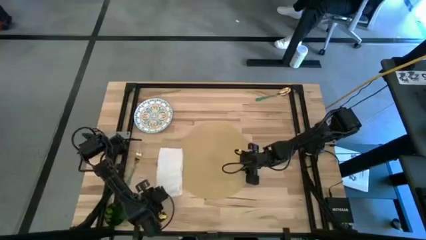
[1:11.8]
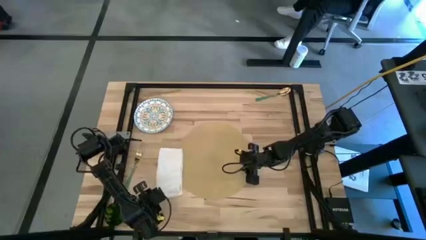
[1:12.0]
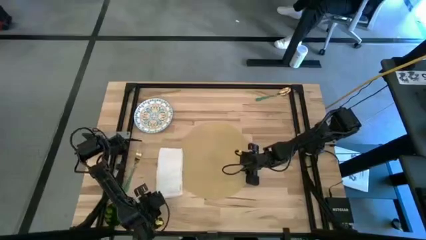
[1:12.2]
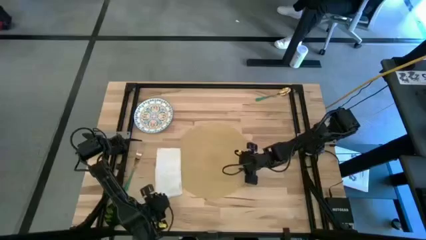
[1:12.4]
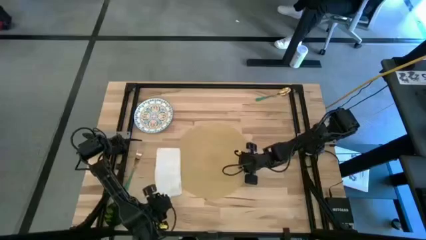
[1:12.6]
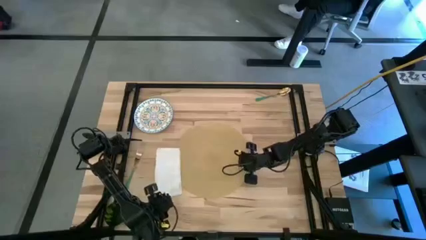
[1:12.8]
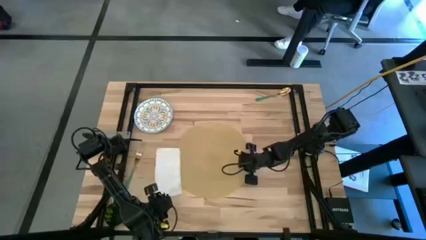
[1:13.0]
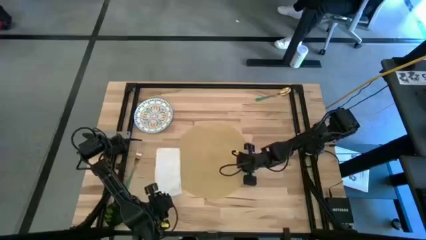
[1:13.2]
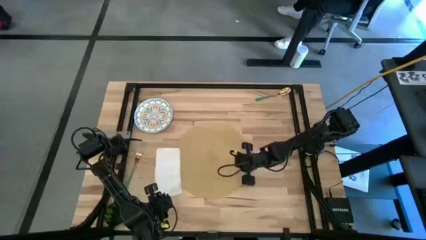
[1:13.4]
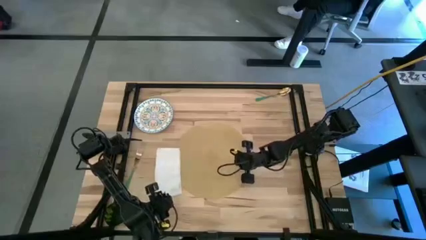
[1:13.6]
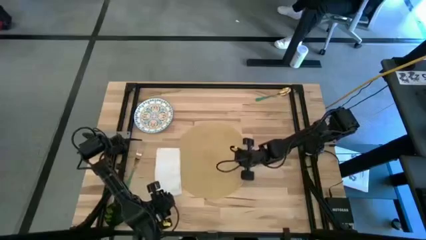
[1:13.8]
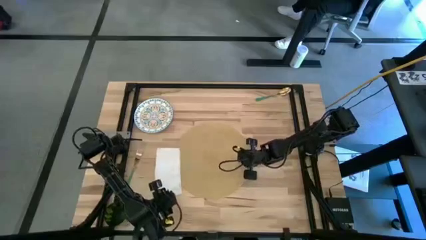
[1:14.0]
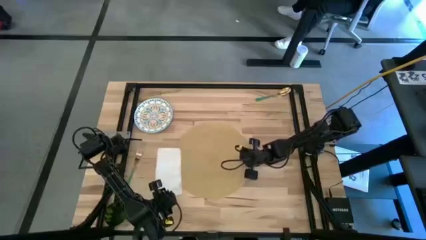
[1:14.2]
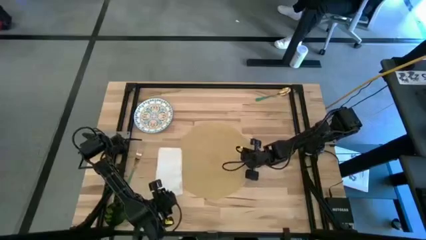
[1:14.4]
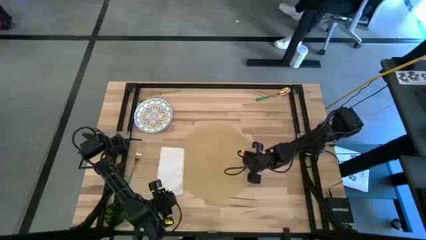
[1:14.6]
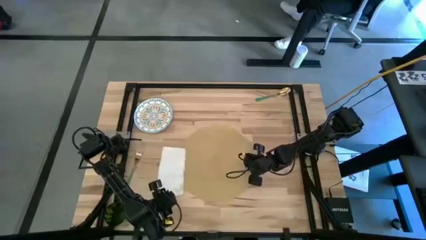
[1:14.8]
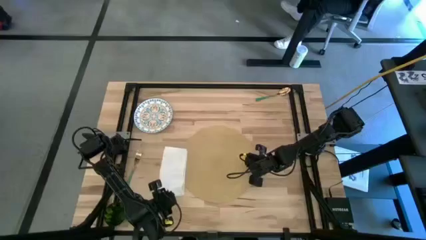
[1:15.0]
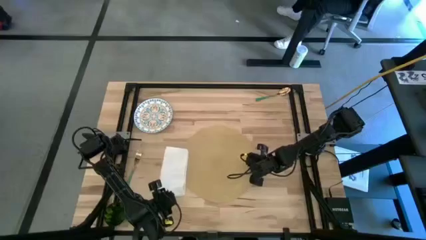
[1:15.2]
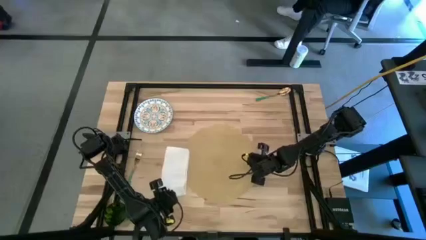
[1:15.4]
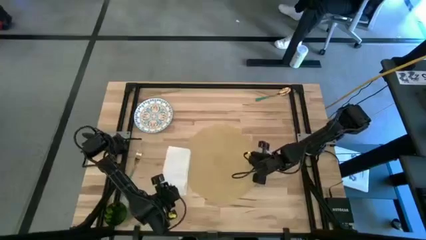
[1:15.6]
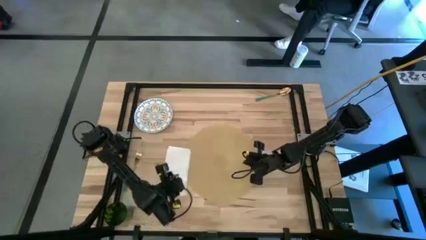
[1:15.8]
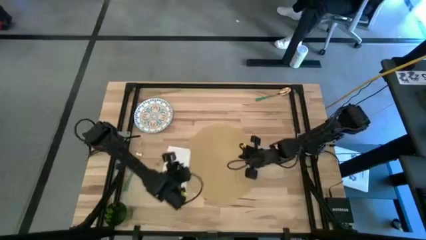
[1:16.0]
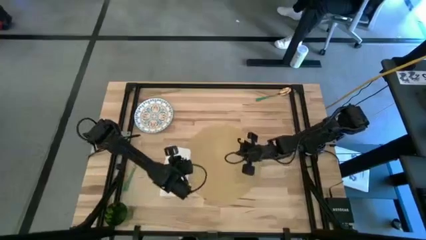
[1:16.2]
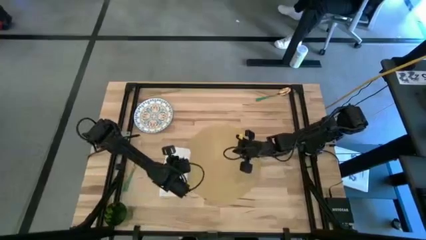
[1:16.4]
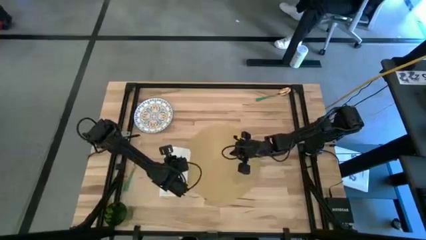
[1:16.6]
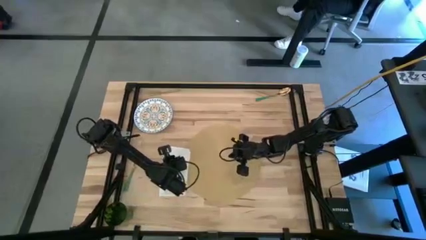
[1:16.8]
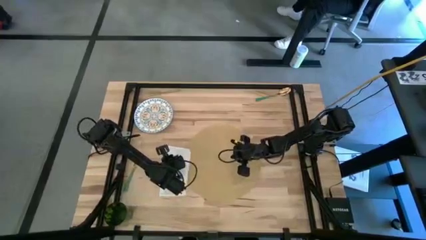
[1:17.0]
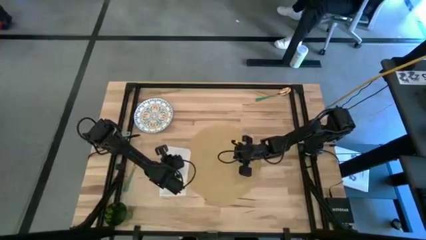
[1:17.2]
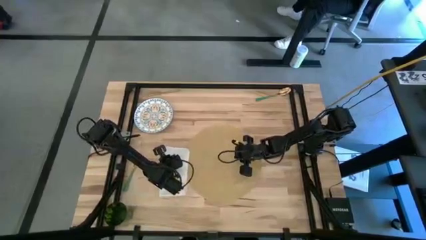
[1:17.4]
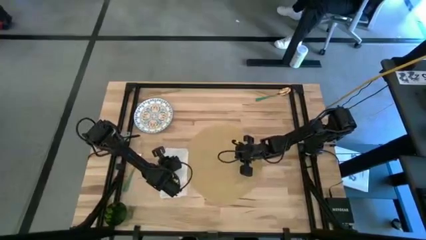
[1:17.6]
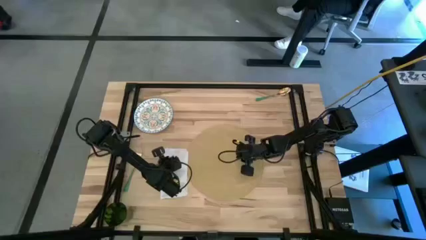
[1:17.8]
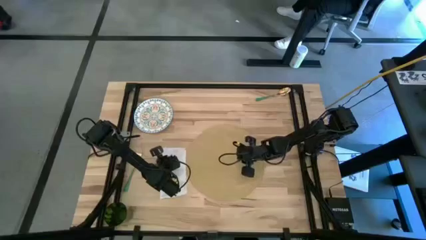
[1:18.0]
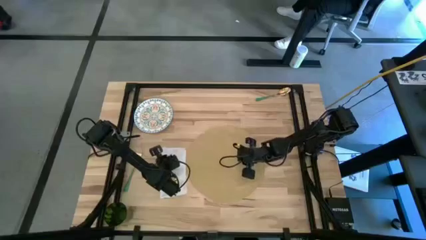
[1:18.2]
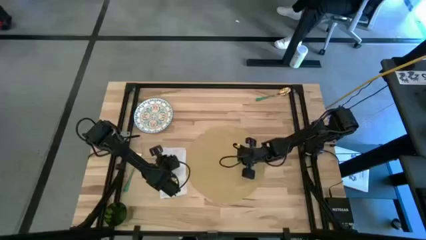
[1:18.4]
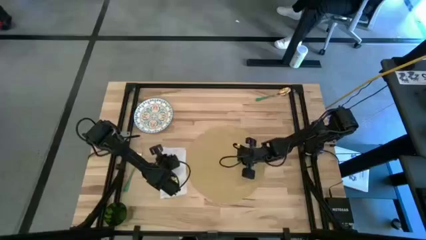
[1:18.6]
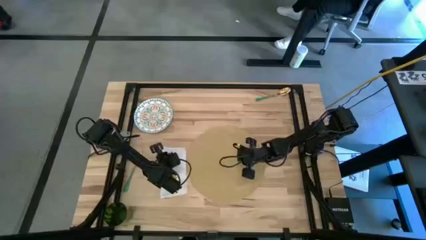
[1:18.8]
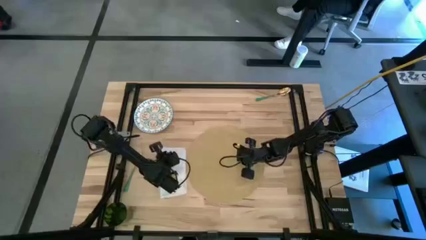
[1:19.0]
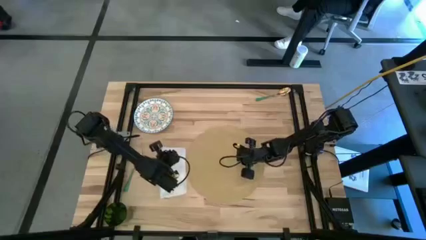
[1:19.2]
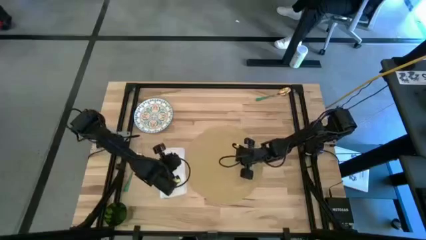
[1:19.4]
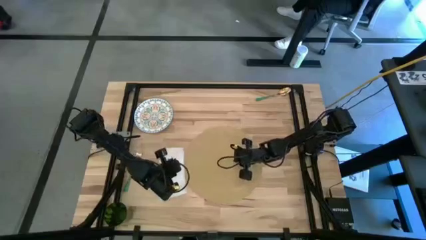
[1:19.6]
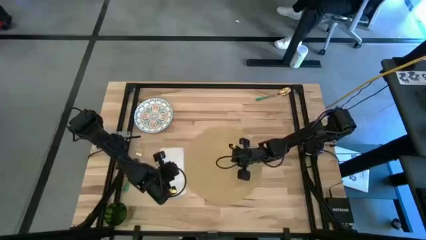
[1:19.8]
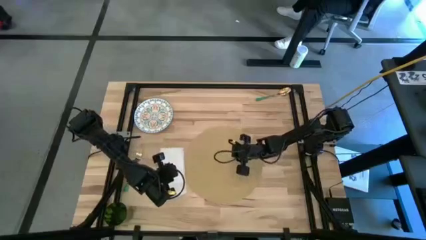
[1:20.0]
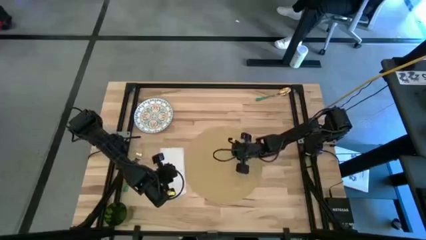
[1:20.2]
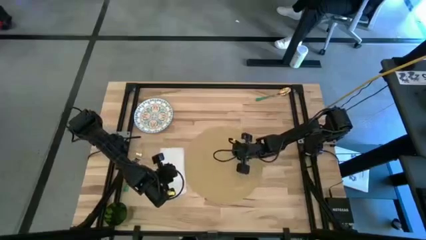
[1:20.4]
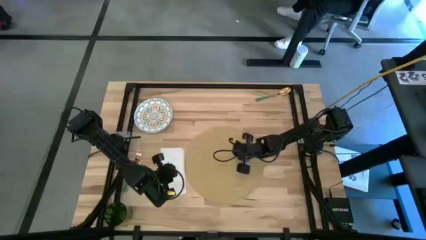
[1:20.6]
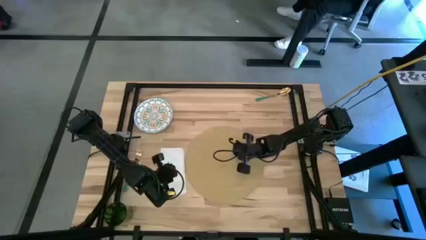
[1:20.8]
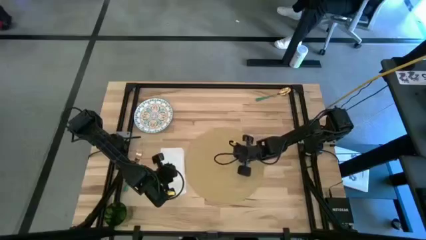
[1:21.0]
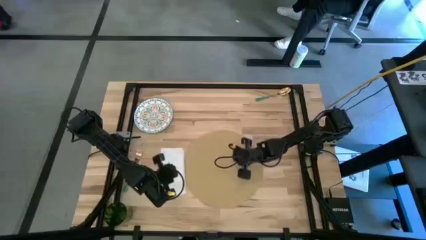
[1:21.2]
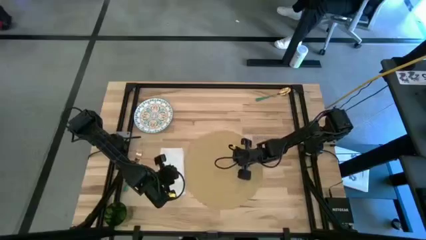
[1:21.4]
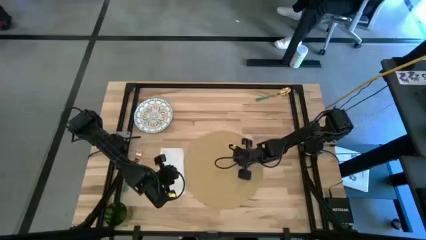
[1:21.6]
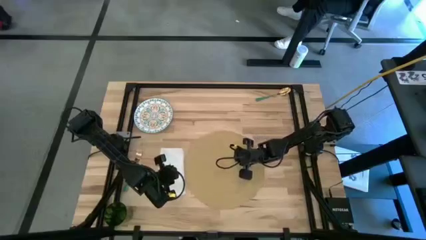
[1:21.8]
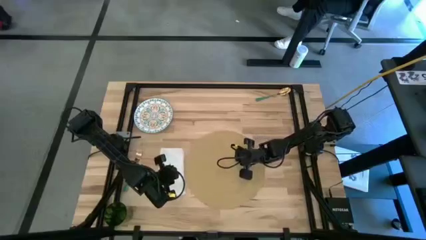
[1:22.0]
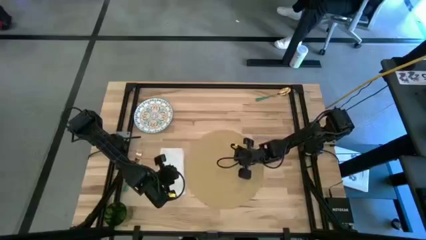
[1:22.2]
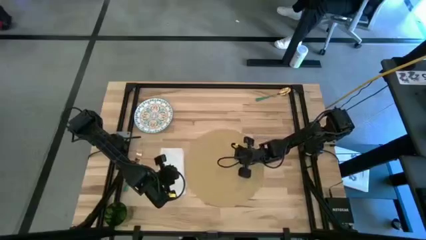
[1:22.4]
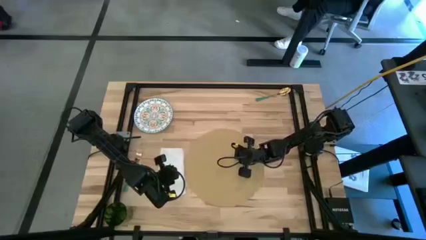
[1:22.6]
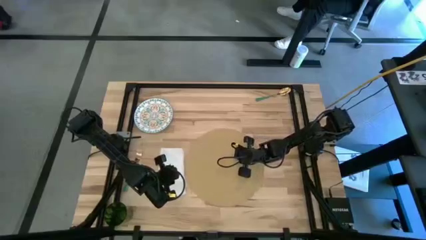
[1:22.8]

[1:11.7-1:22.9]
Task: Set table place
Adjust the brown place mat
